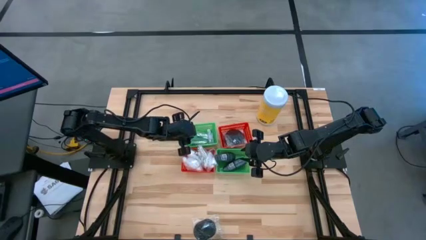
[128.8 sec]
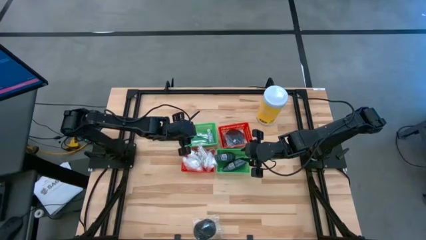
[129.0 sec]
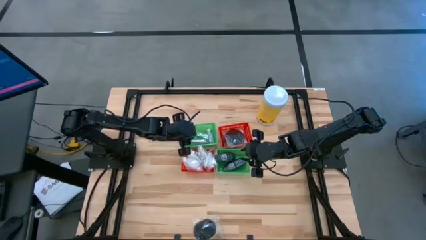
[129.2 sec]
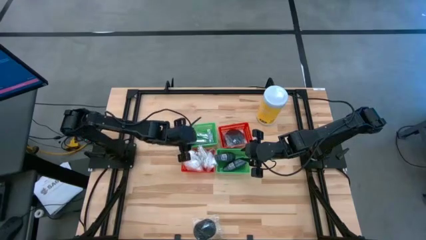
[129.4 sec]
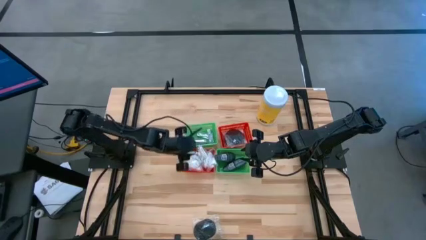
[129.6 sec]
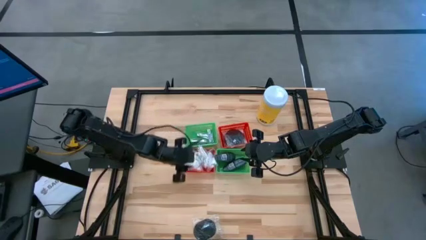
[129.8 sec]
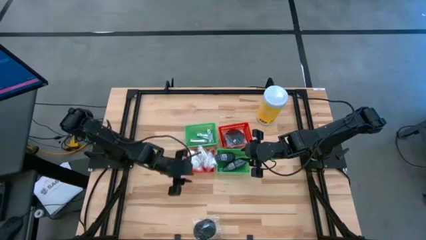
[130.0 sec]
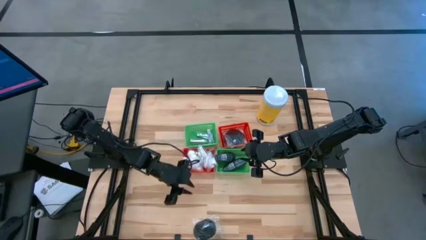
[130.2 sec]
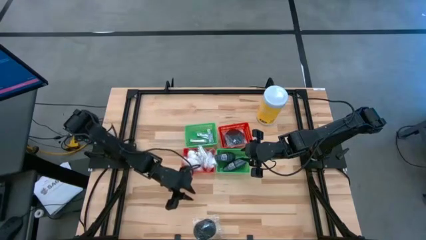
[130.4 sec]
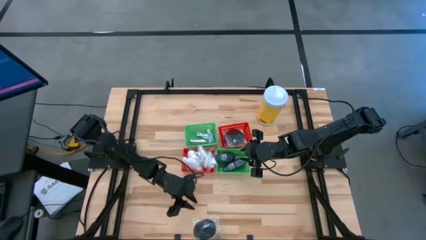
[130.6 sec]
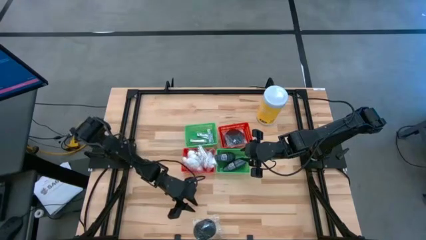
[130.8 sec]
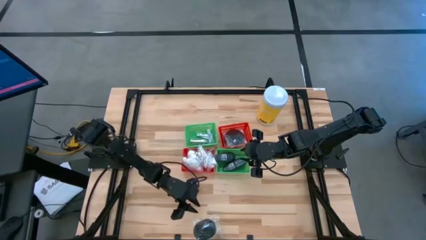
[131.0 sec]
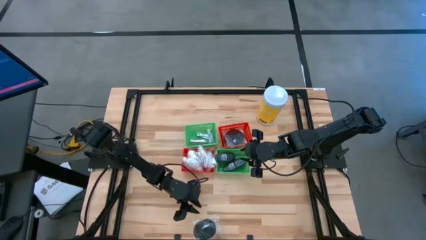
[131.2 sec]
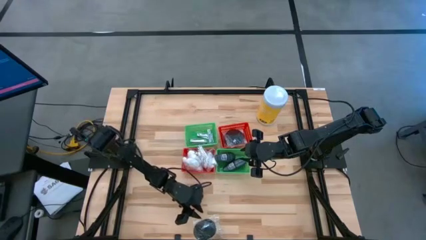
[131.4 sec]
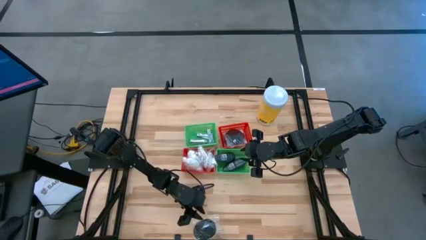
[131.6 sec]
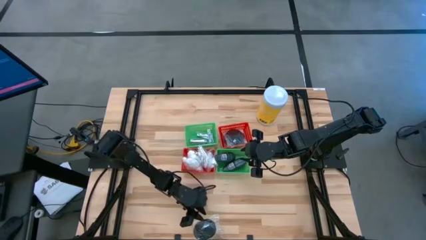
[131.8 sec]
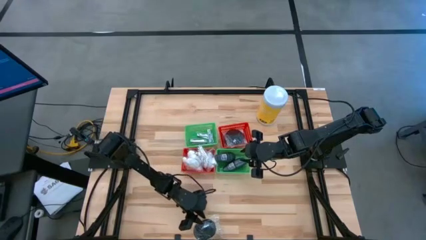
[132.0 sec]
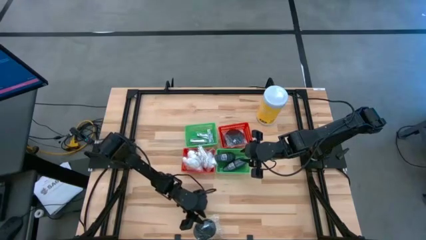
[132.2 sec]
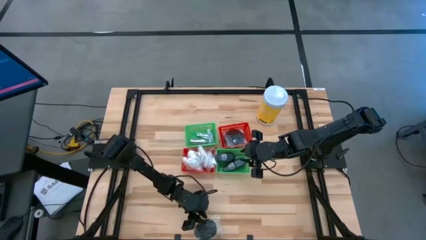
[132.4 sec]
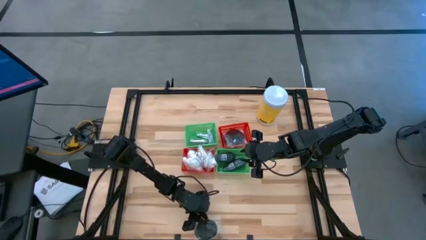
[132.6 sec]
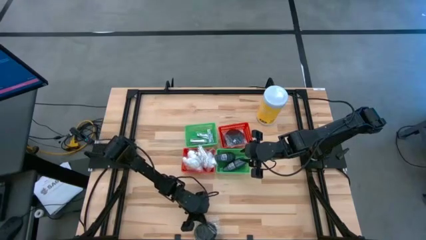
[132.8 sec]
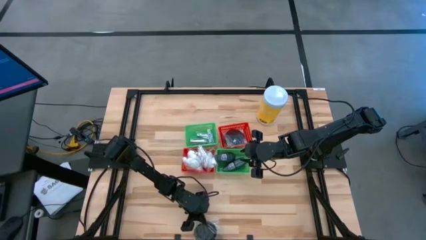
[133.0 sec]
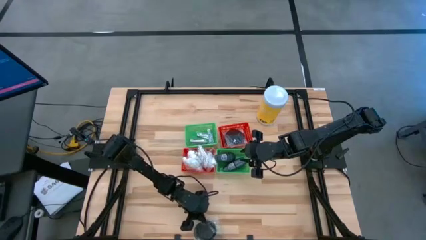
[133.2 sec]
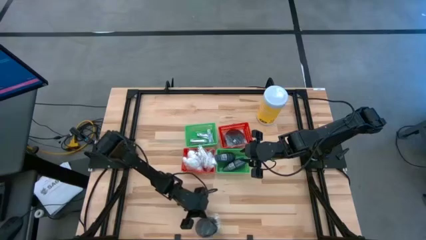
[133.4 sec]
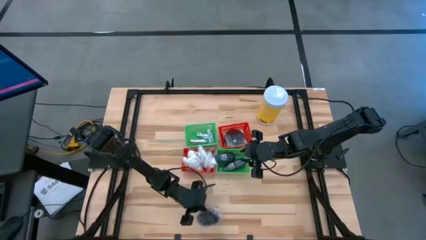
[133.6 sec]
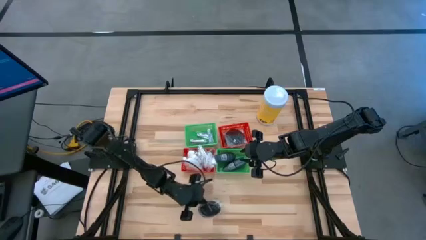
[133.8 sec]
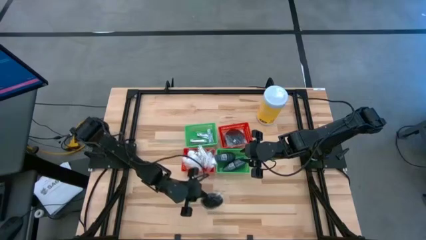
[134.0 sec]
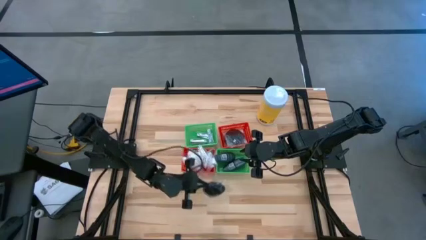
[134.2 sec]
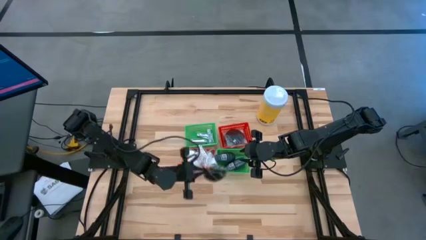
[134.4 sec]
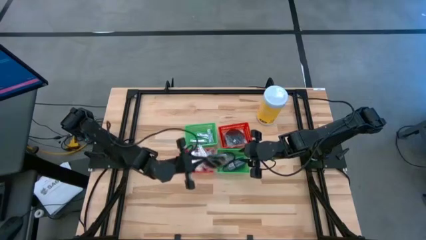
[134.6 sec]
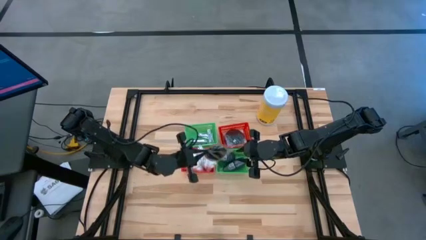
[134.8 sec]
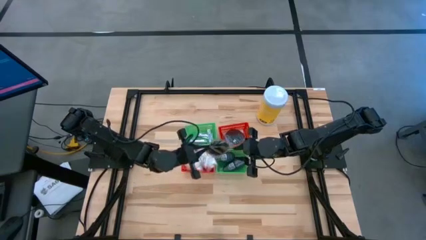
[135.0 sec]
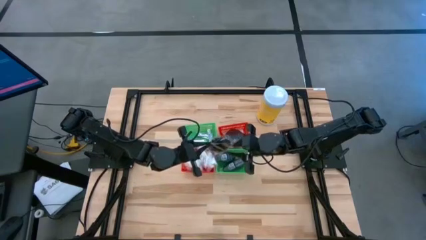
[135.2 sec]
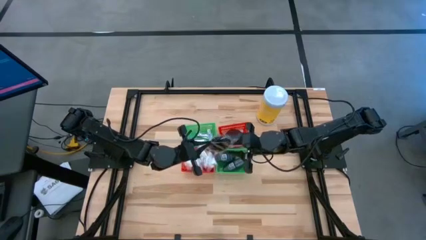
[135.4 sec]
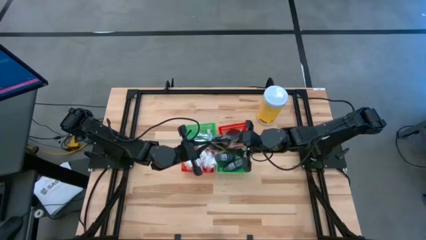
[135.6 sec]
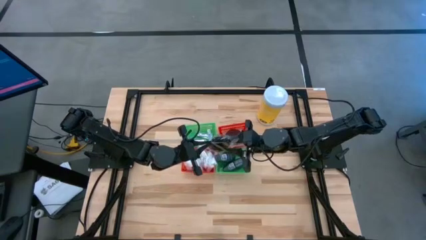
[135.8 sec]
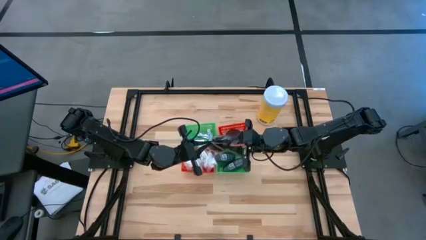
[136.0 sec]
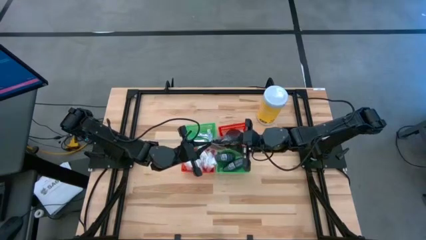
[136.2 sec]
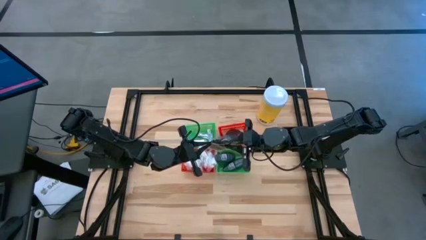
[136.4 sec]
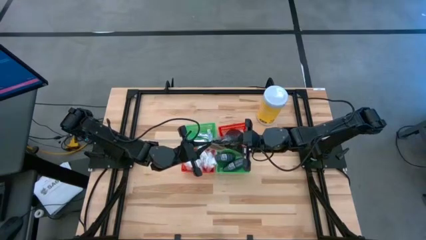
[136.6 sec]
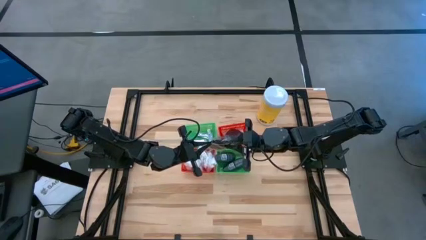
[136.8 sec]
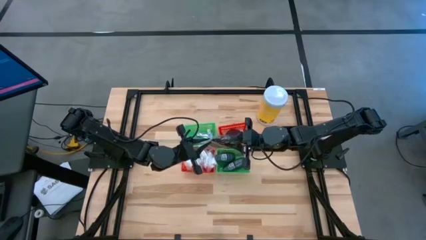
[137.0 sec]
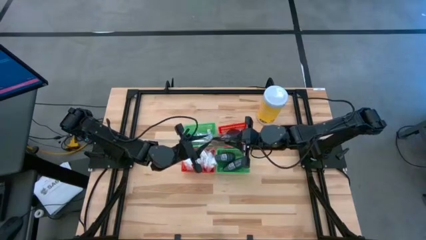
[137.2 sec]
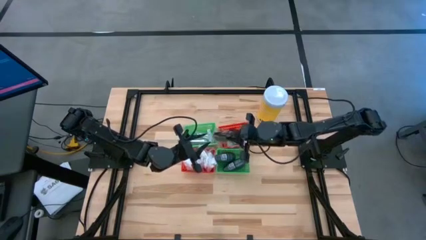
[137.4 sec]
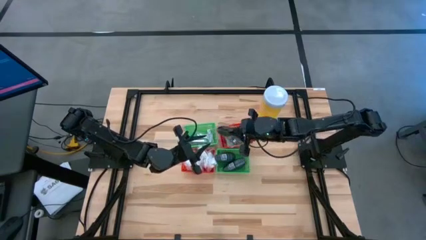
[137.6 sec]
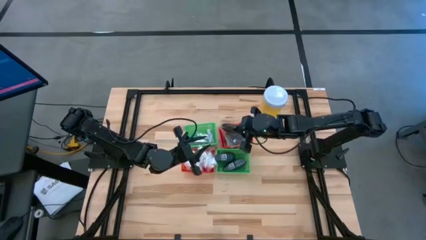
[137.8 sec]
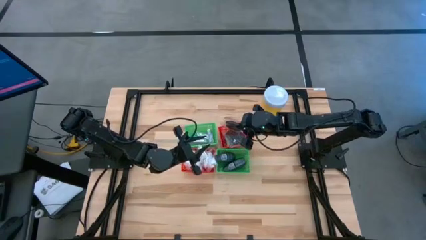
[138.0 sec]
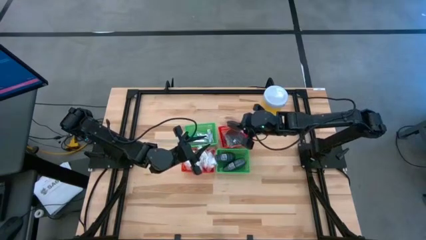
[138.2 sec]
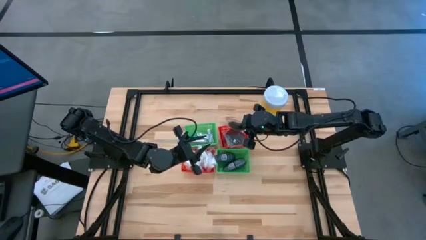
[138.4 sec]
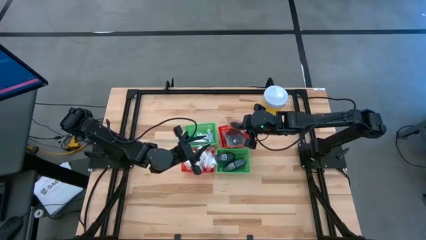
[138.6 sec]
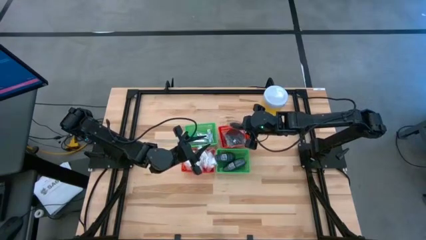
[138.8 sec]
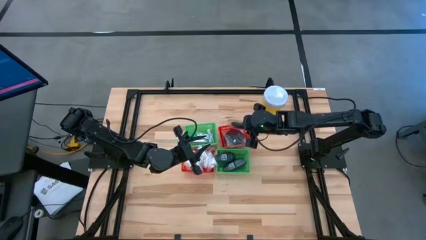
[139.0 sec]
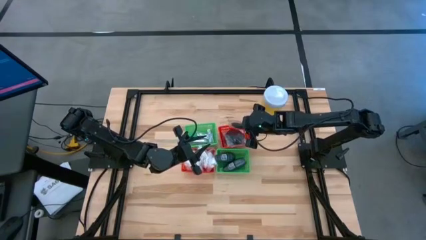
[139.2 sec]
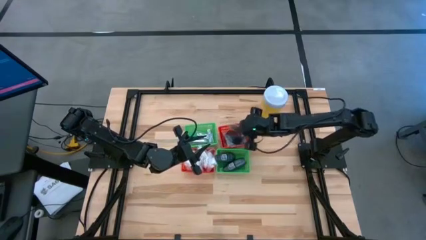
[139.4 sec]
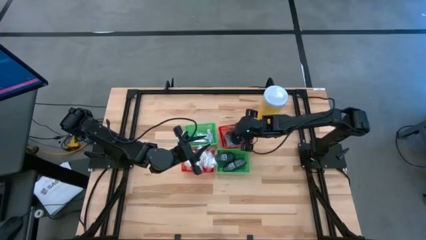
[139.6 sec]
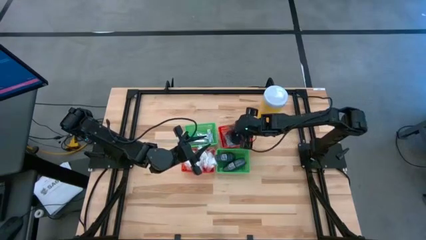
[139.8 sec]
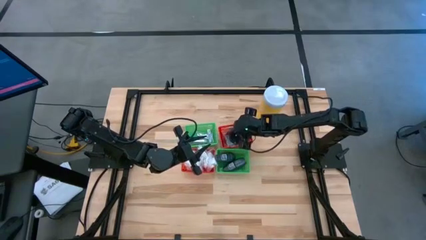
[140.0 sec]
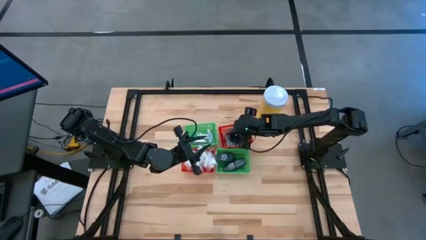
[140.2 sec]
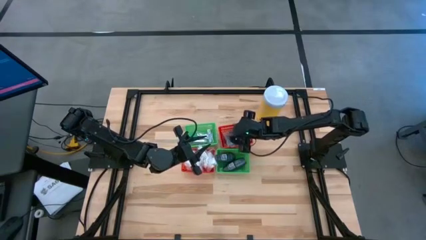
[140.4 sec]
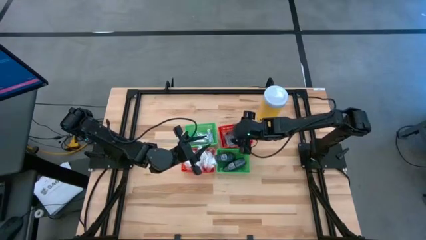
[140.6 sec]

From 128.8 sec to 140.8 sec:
Task: Pick & Place Travel size toiletries
Put the black hairbrush into the right red basket

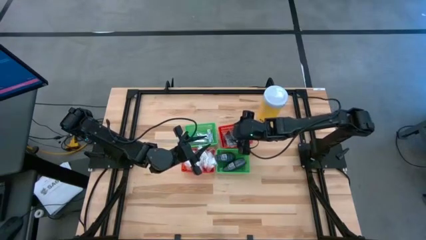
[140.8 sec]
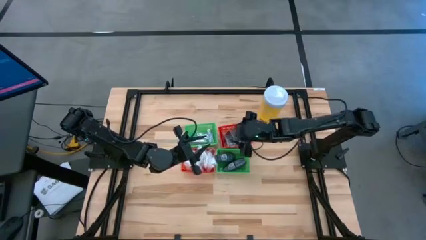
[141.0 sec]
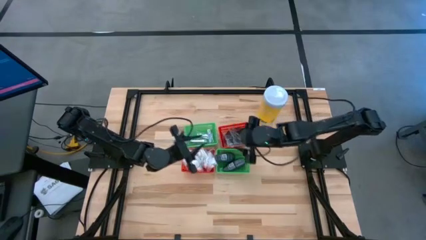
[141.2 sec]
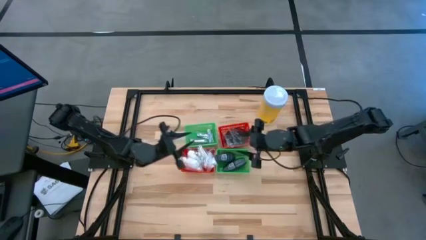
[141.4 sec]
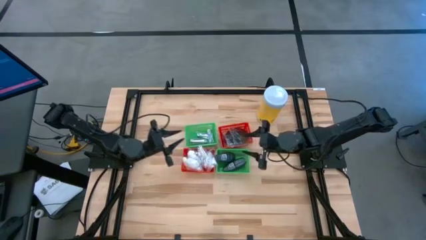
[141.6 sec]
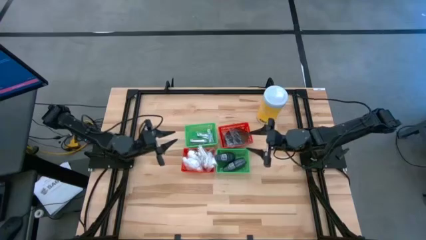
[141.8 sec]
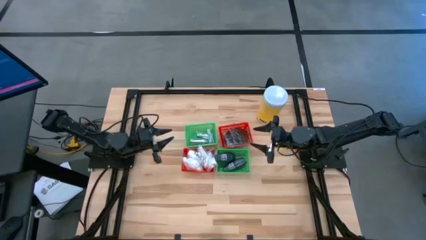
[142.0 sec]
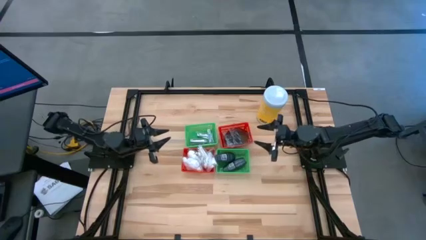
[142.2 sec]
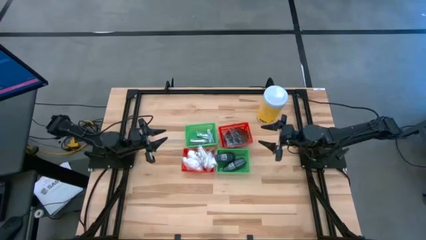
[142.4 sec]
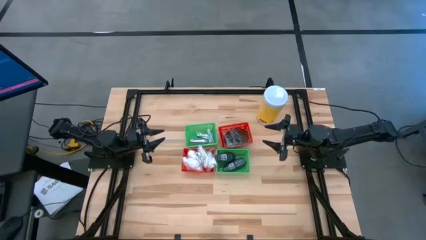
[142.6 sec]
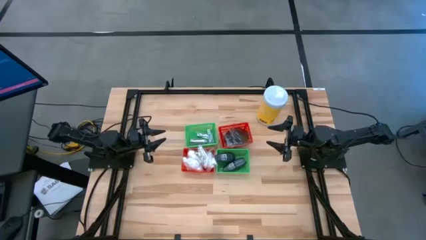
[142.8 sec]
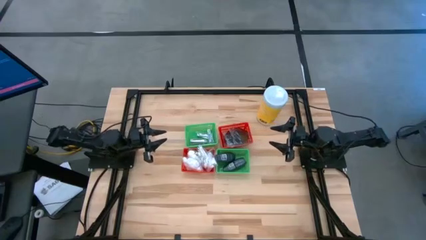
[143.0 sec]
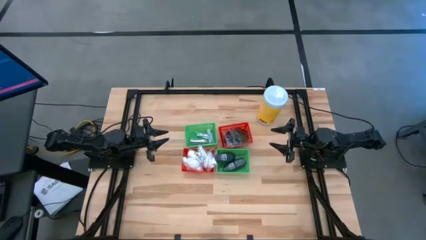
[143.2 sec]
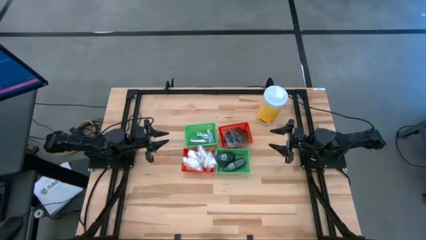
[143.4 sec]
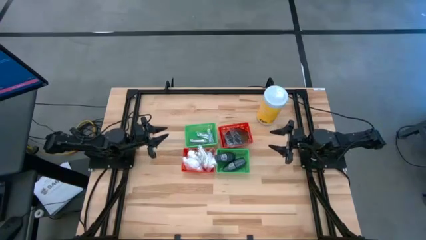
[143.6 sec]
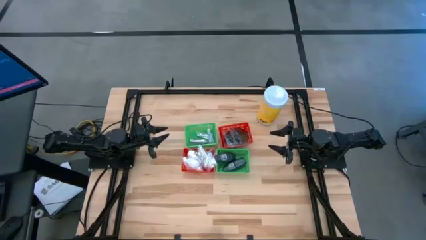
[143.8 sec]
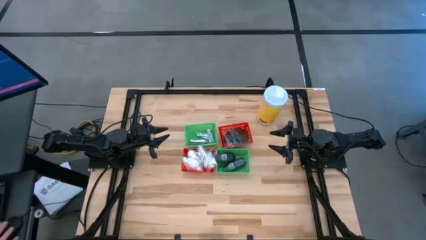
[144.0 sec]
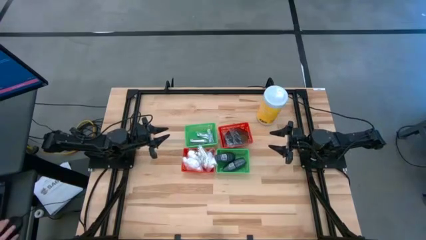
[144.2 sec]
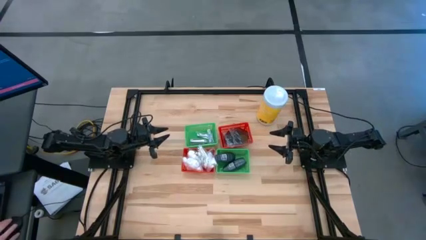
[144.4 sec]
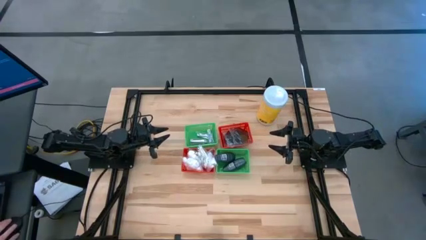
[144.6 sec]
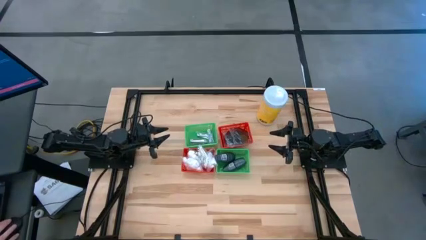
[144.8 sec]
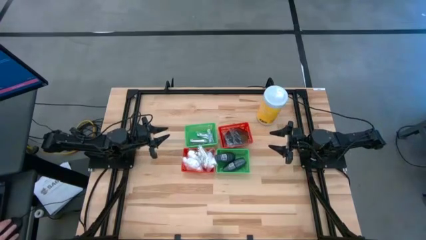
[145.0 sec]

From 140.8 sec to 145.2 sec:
Return to Home Position
